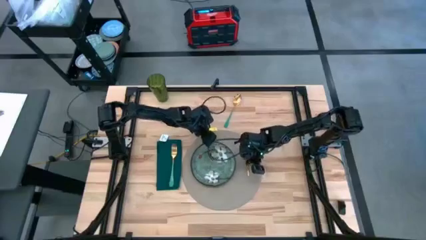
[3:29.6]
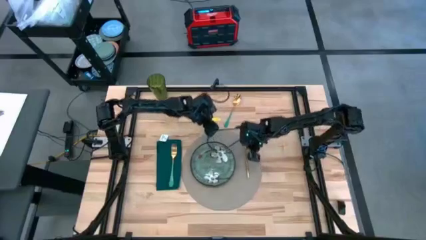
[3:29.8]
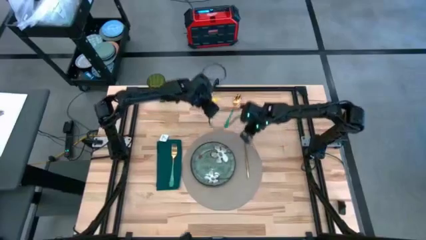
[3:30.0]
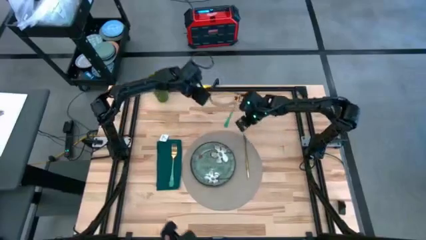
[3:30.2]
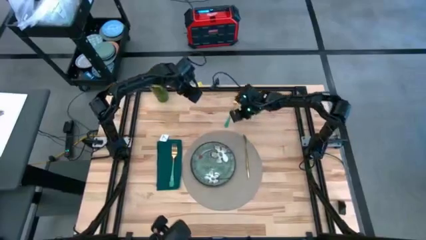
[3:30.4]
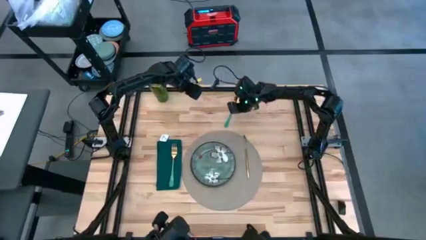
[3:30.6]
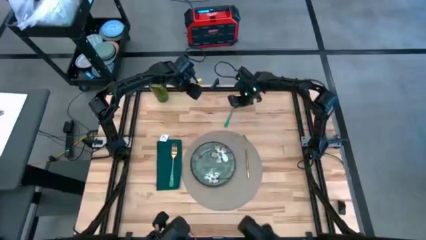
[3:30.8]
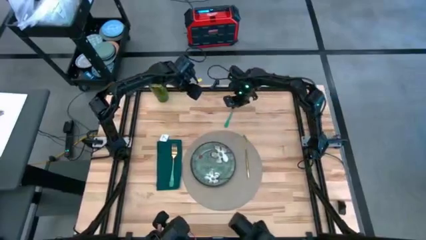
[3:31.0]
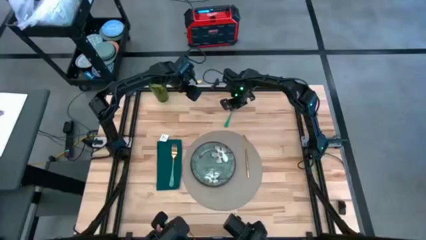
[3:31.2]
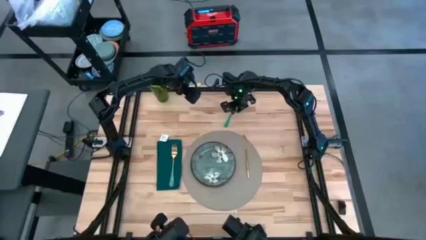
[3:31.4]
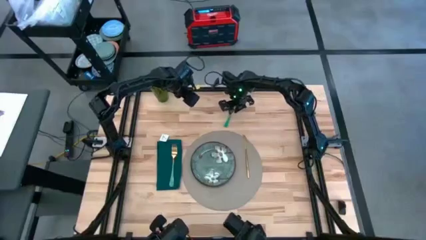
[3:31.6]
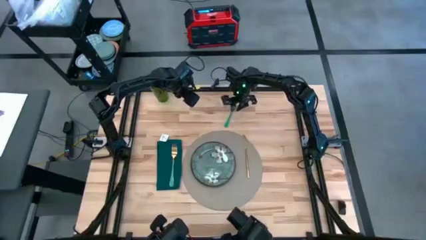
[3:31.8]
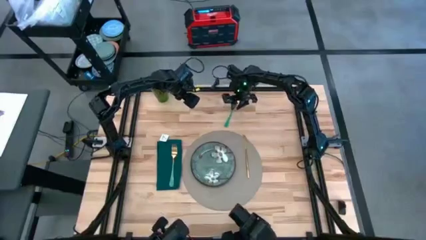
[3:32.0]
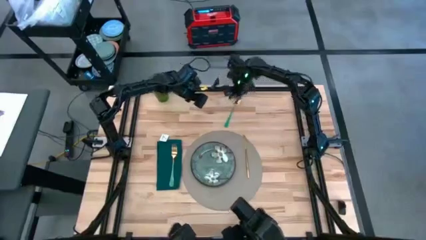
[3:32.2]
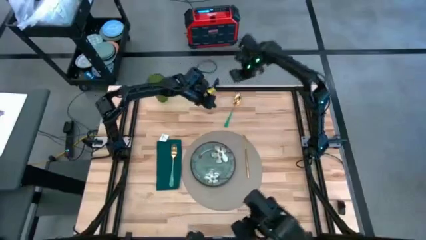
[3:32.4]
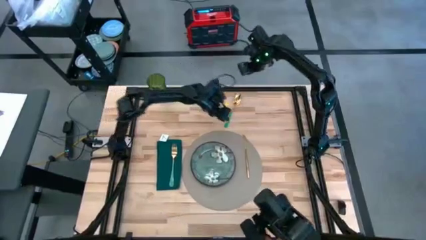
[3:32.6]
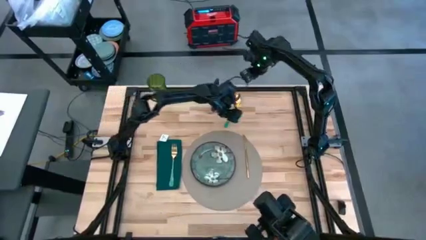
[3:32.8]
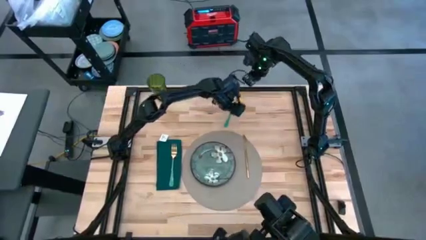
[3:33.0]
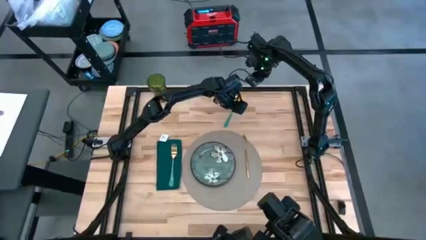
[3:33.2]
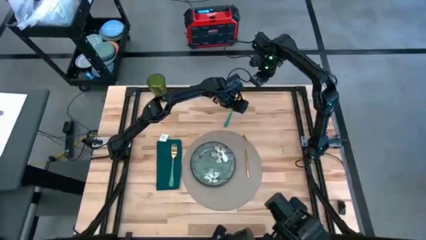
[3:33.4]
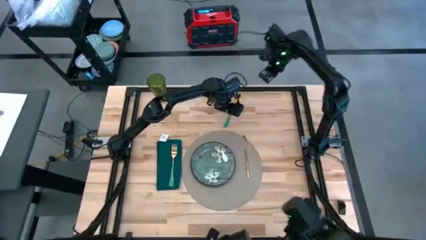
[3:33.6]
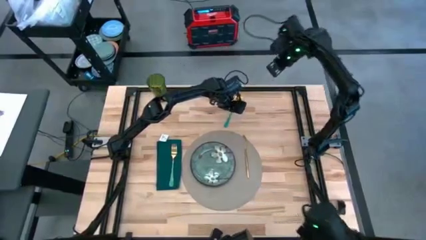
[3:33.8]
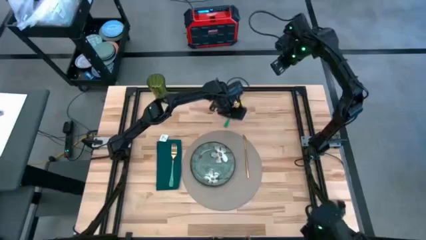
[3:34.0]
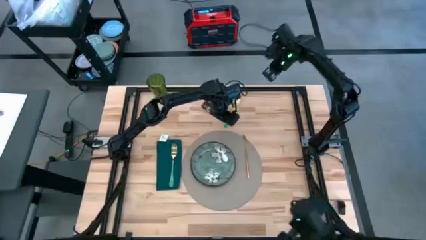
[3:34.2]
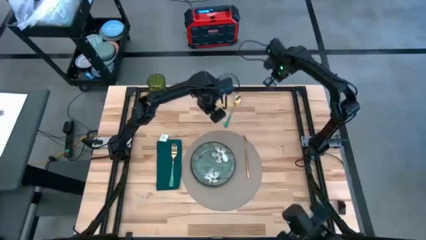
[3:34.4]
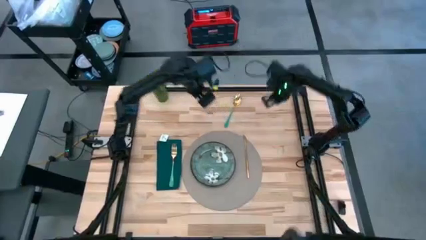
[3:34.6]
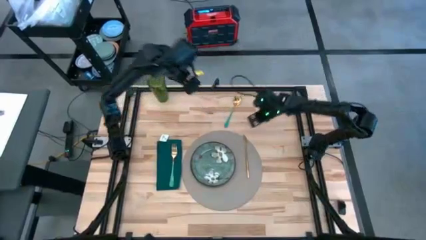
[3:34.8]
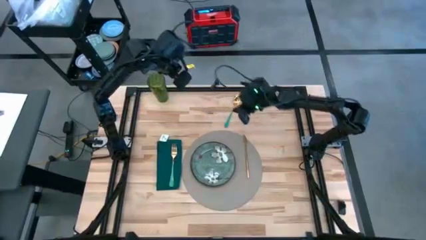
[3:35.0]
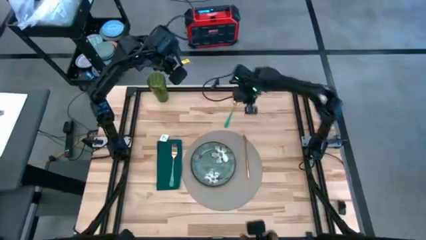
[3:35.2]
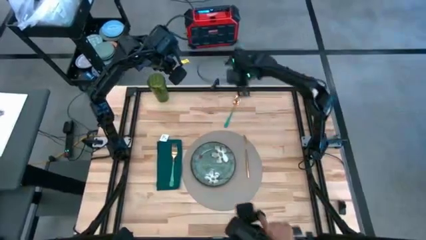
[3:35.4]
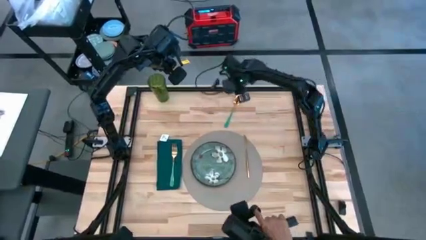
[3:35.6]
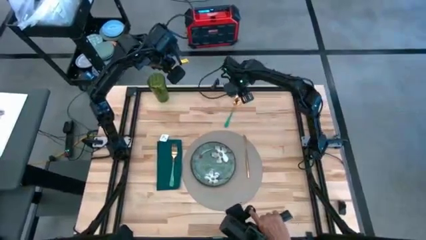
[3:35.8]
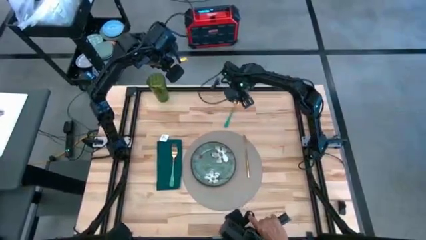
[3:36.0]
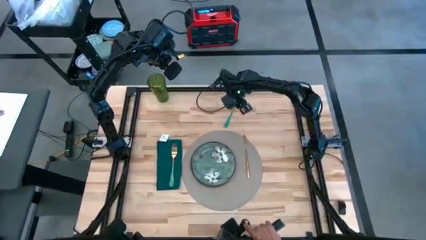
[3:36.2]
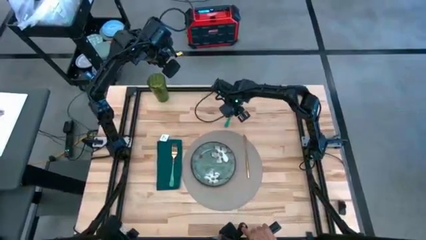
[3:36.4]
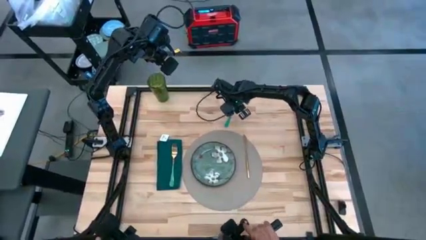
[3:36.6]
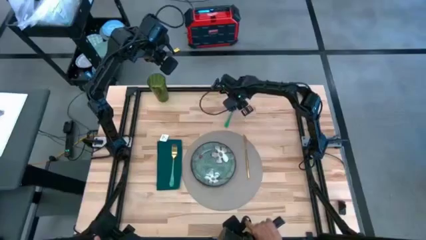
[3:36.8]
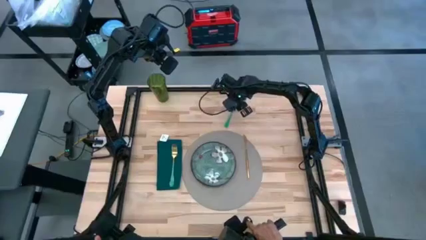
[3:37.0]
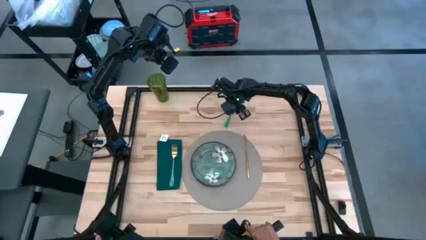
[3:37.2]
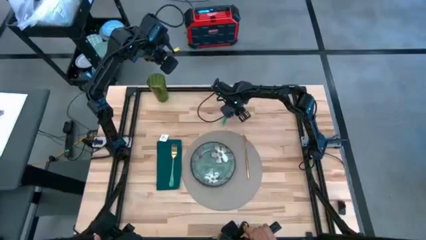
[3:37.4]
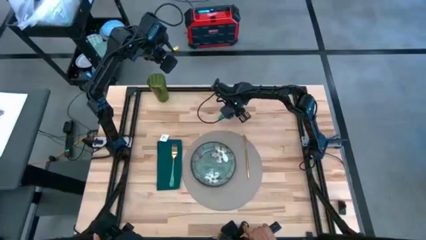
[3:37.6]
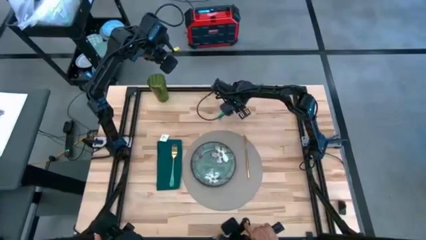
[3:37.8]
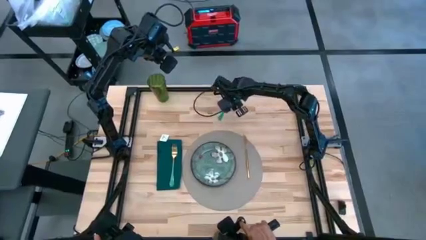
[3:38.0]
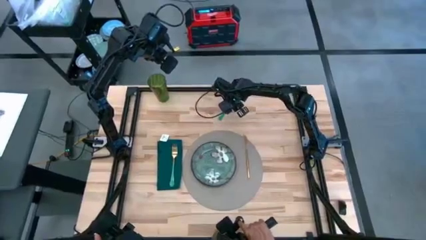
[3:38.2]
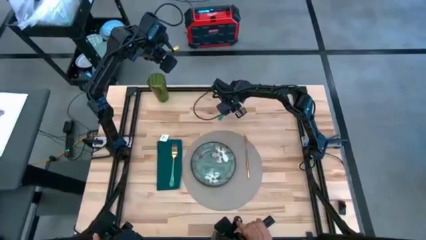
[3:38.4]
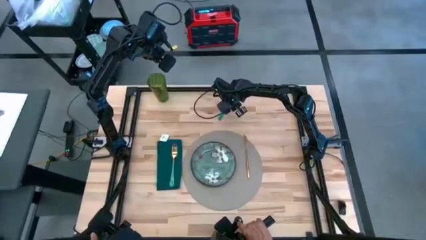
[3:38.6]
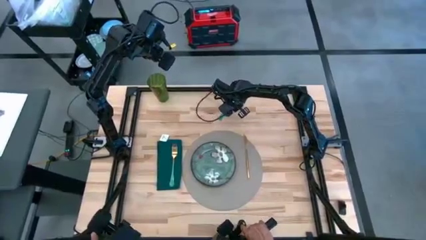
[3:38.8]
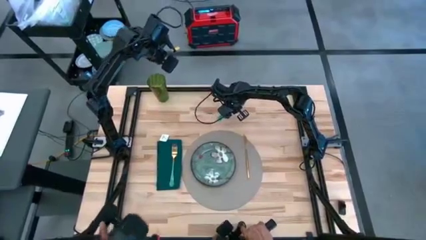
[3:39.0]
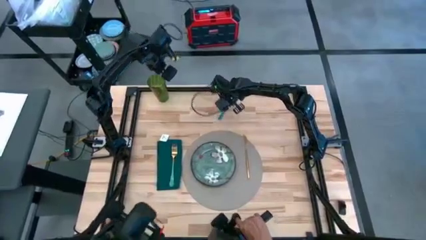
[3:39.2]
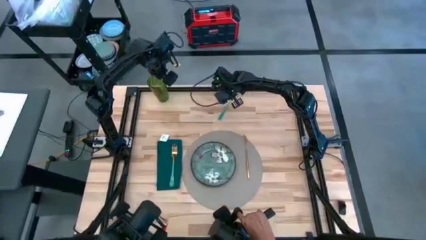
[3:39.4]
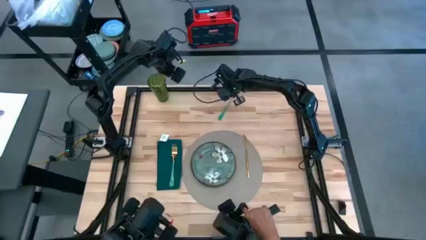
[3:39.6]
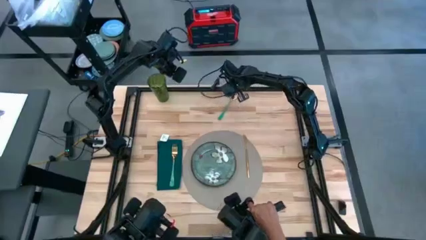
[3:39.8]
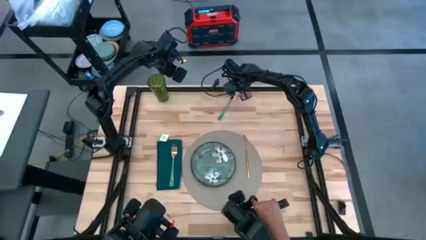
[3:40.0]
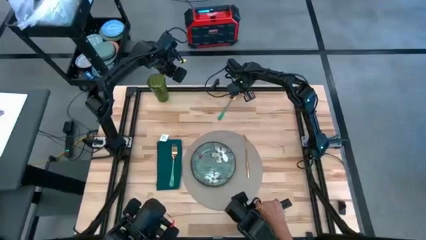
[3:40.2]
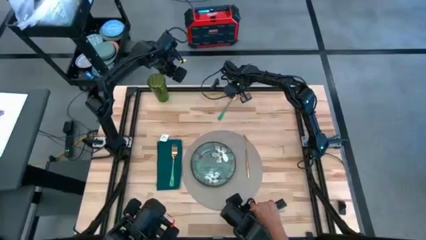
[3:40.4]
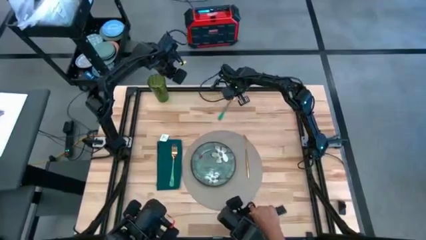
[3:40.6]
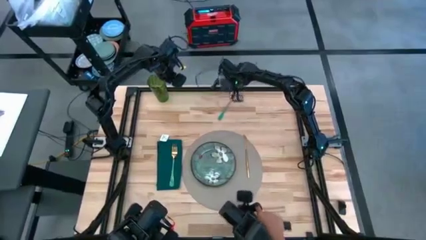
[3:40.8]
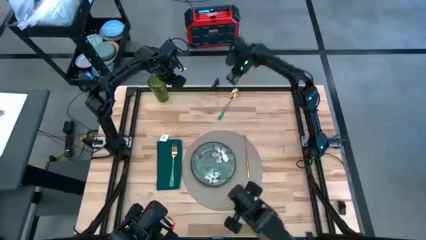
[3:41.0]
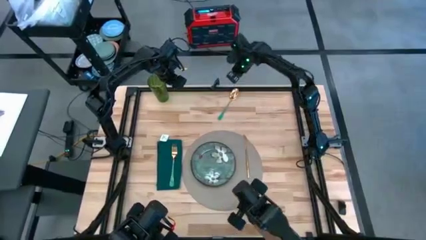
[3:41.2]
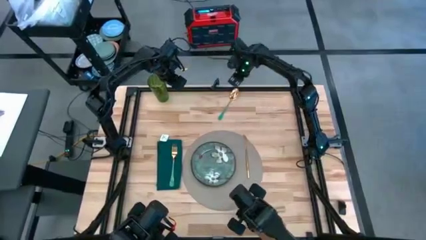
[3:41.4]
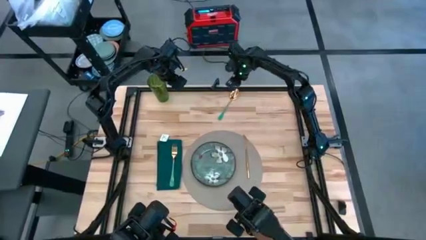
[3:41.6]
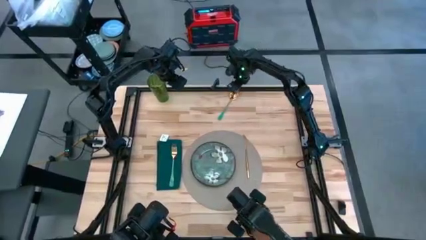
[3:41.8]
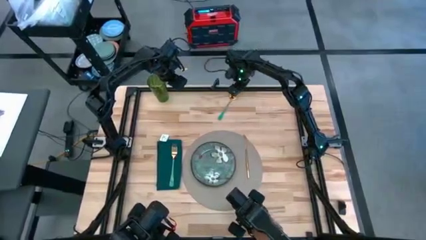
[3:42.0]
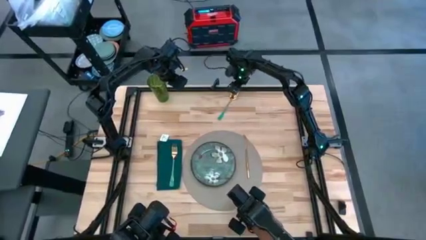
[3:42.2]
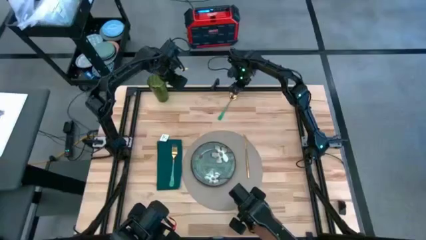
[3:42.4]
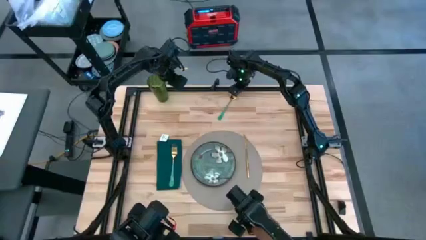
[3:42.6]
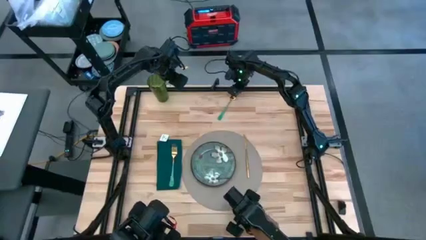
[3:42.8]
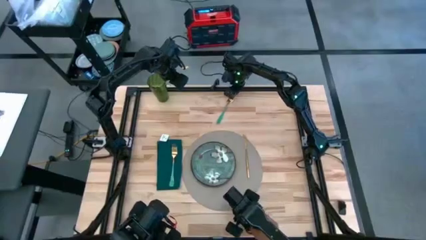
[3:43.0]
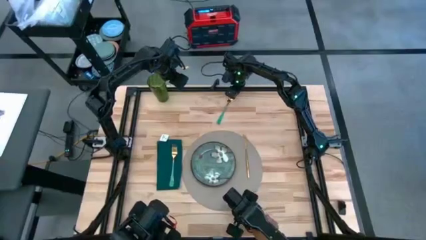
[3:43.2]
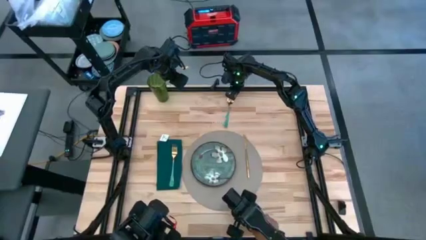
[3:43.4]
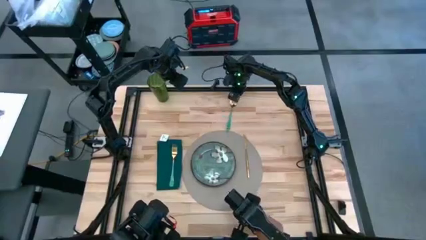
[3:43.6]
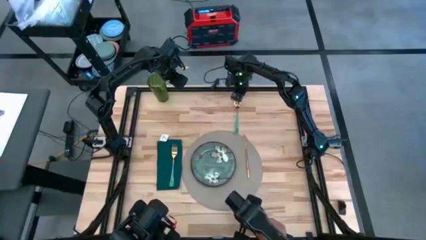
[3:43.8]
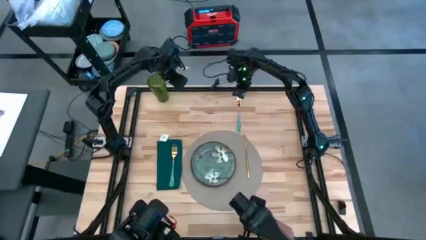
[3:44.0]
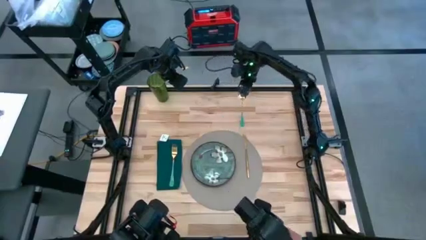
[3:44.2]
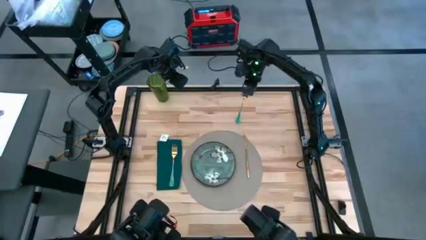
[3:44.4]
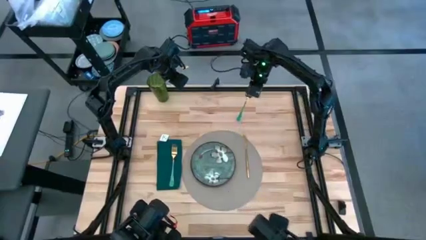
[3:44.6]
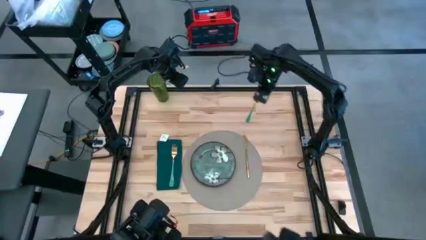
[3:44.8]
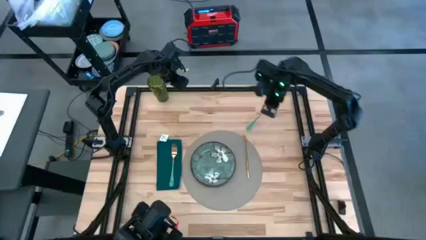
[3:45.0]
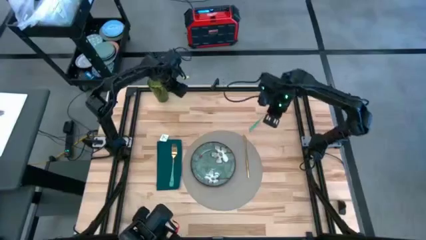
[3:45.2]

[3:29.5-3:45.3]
Task: Set table place
Put the green spoon on the gray table mat

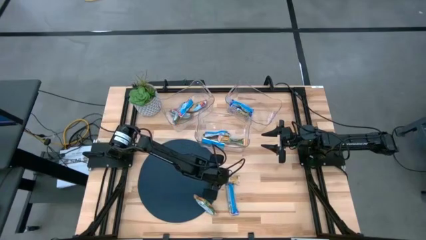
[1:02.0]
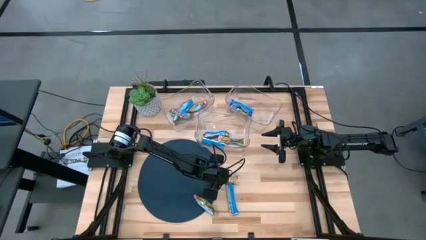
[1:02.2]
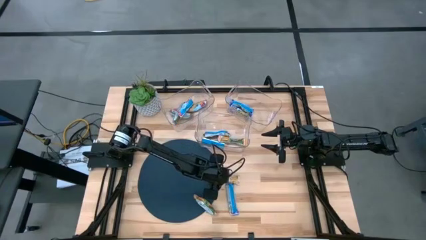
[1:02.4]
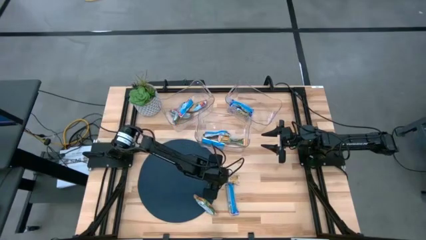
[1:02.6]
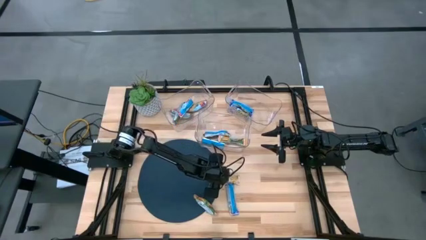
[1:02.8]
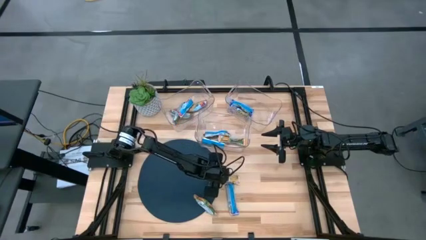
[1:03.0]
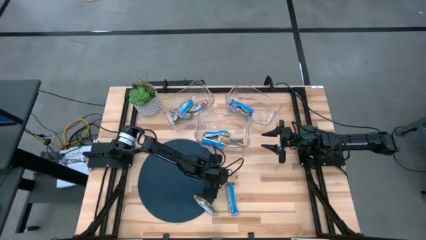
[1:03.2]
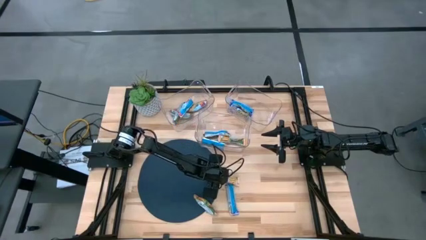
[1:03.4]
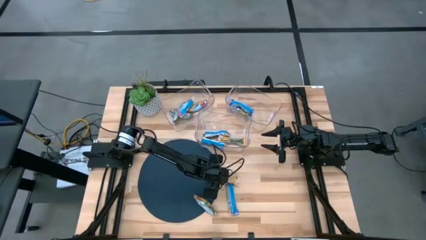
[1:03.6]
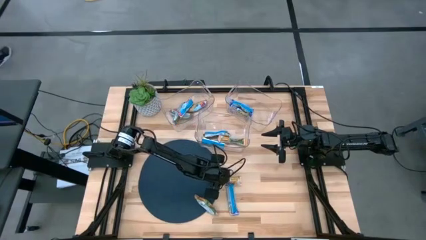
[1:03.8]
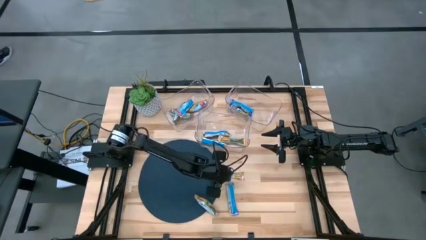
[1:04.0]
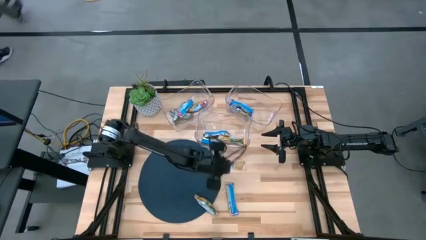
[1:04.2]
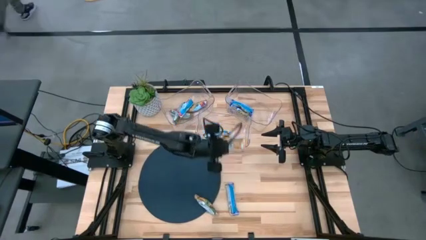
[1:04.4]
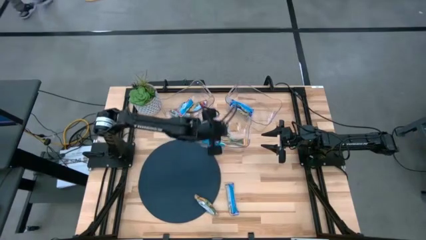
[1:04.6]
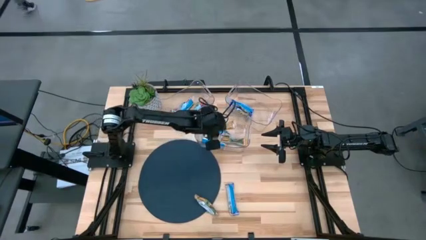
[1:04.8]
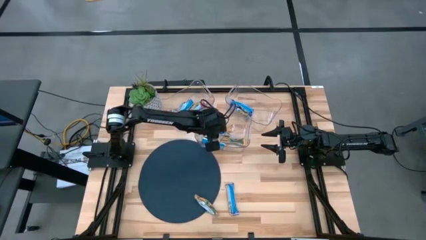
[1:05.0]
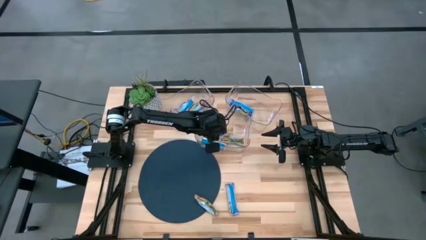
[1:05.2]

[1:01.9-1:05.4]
Task: Pick and place Granola Bars by type
Put the yellow granola bar into the middle transparent bin
